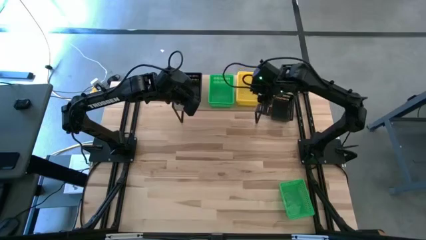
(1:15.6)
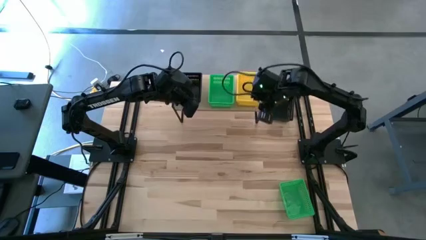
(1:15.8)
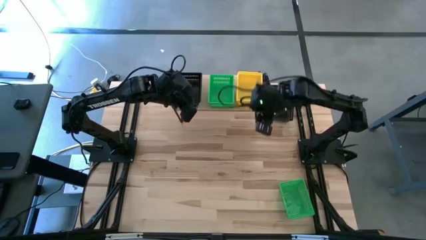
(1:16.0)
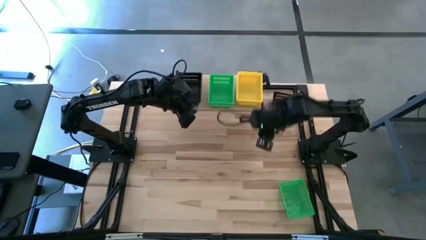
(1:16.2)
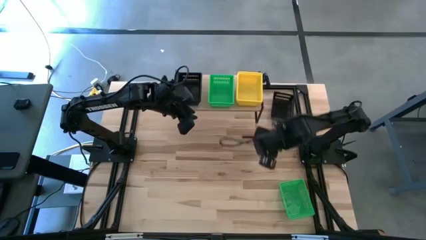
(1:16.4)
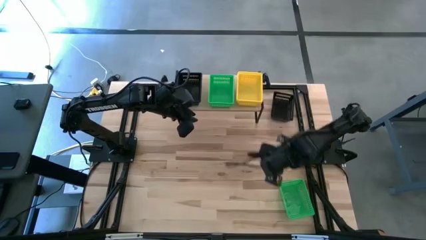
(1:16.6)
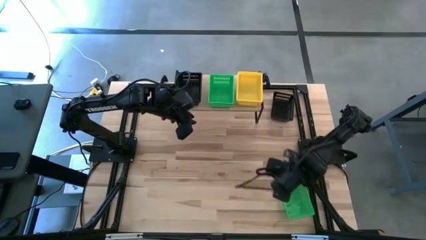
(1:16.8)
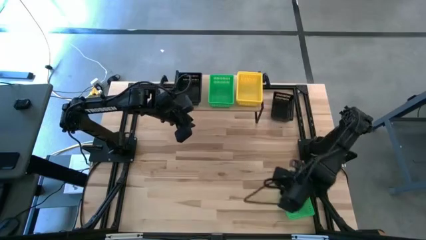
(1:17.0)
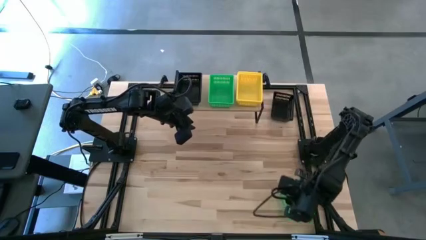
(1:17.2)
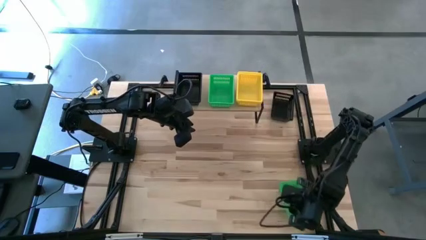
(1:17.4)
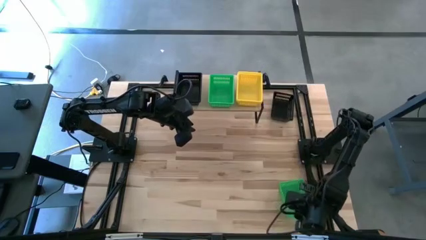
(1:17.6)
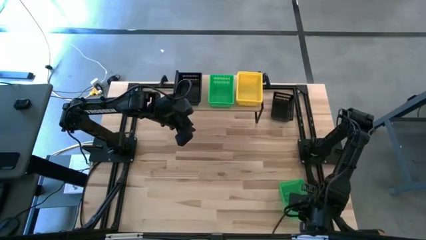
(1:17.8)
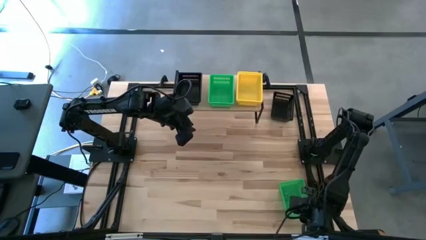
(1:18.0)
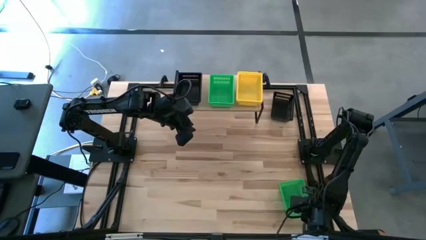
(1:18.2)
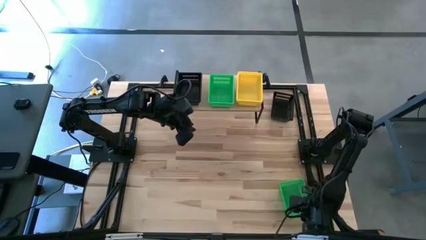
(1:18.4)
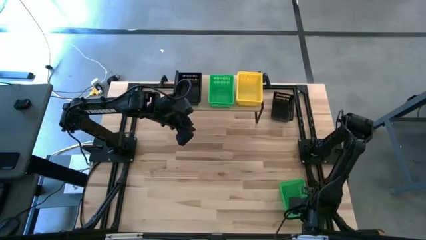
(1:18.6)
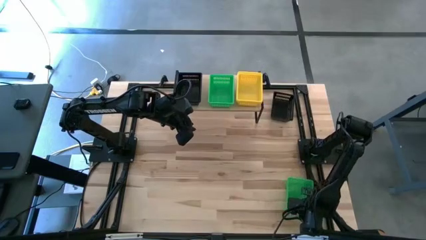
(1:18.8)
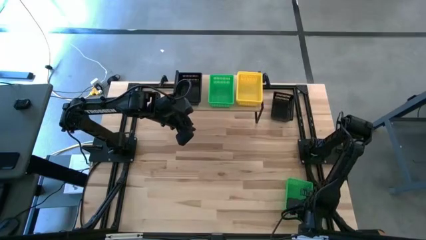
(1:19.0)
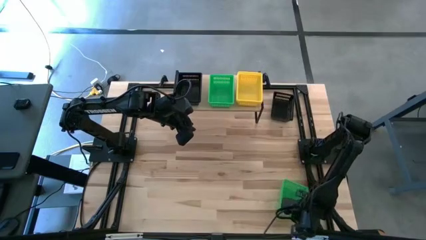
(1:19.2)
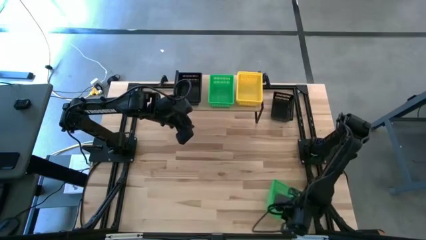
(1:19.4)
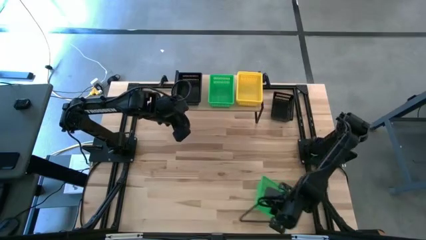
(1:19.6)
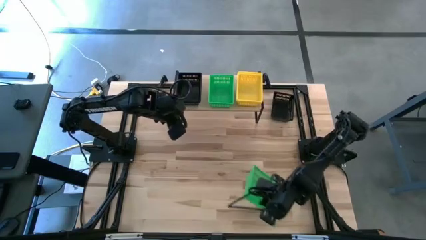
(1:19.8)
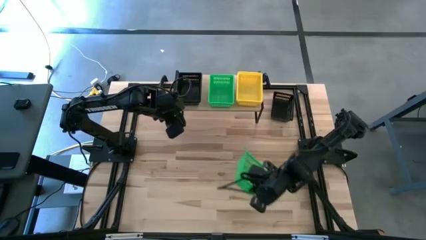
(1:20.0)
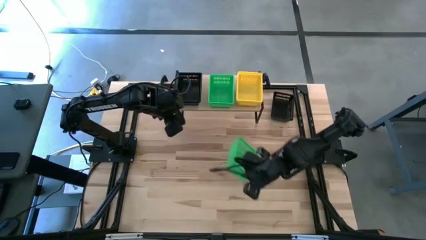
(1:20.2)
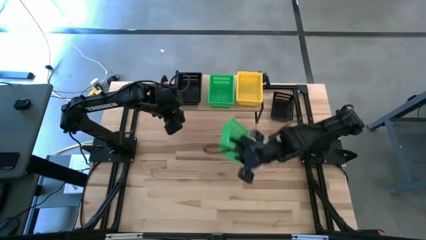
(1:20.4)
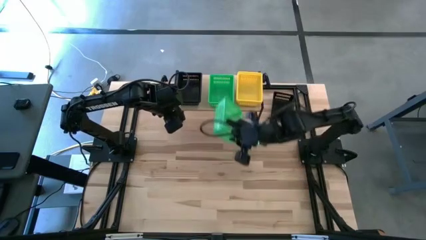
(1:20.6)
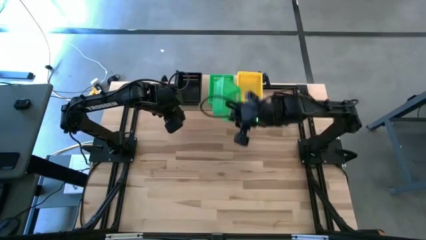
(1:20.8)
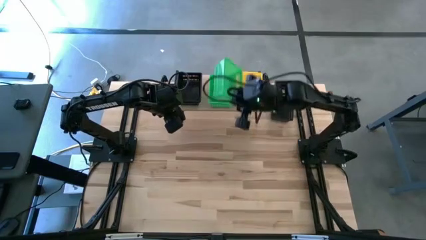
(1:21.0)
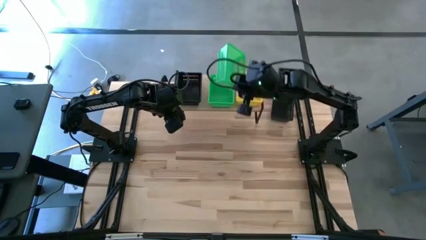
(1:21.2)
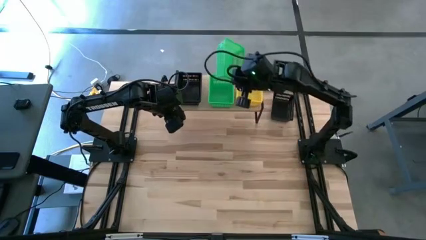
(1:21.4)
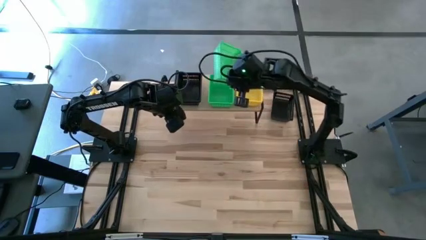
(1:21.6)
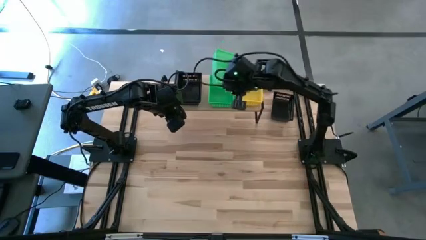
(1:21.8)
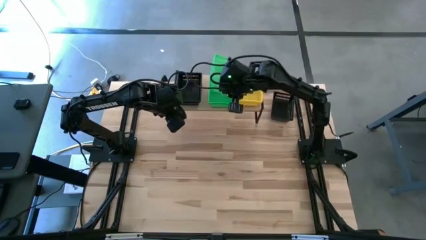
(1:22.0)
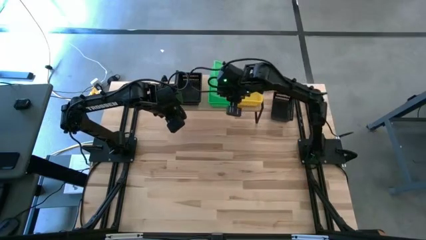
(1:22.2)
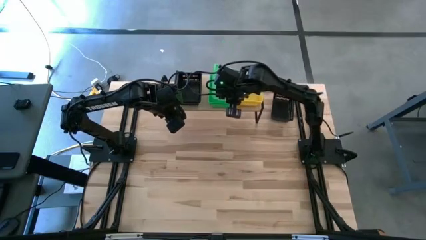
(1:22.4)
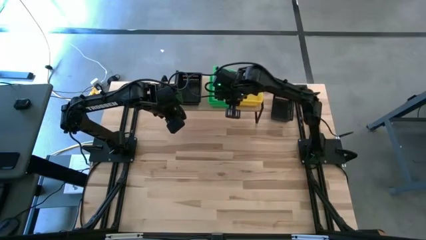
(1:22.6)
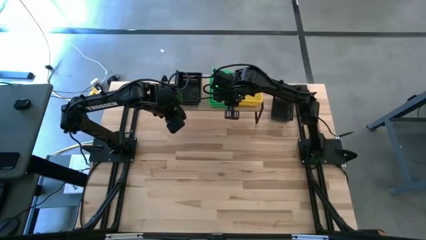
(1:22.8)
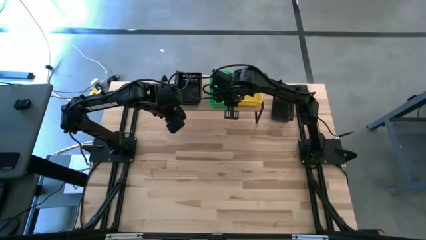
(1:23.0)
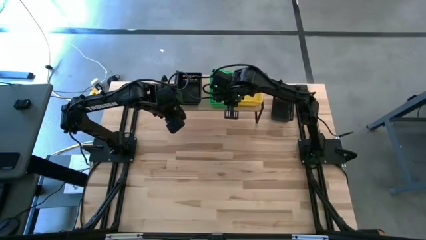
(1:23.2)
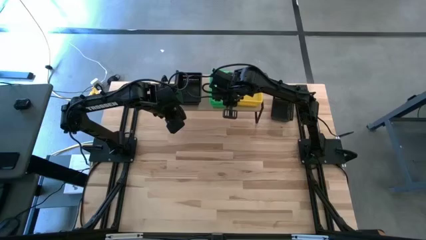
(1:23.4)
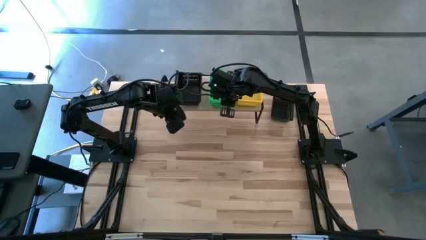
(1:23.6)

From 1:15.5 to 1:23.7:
Task: Stack baskets on shelf by color
Stack the green bin on top of the other green bins on the shelf

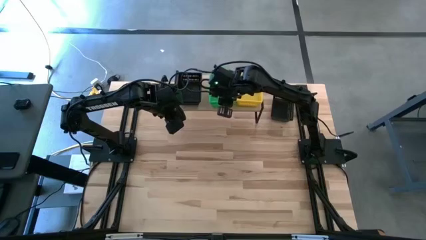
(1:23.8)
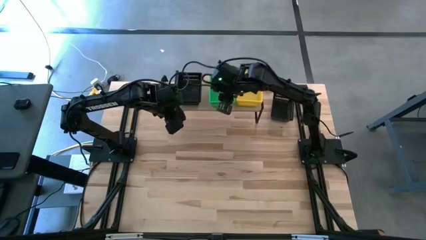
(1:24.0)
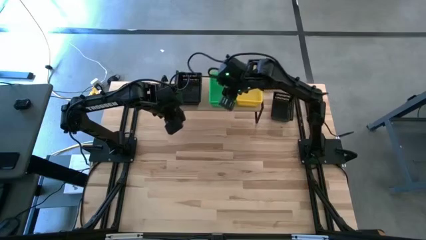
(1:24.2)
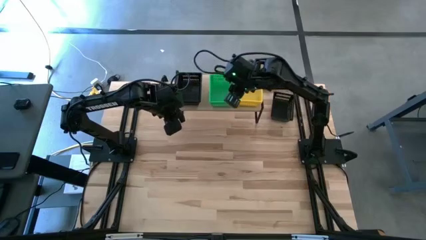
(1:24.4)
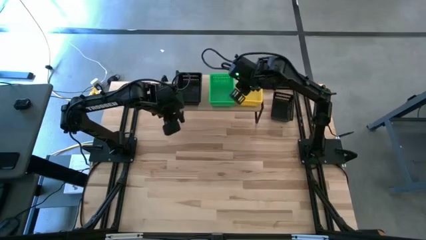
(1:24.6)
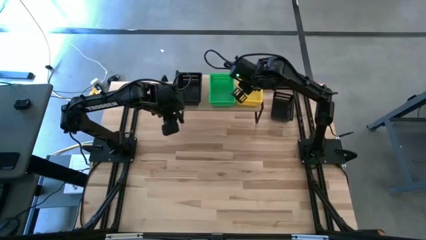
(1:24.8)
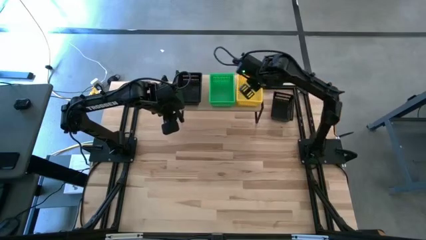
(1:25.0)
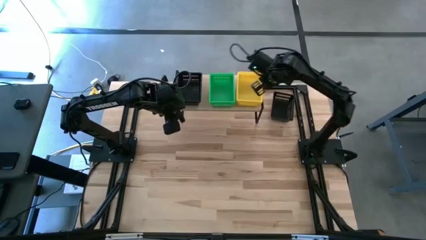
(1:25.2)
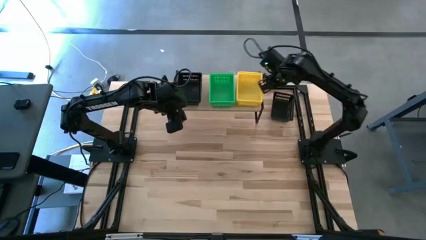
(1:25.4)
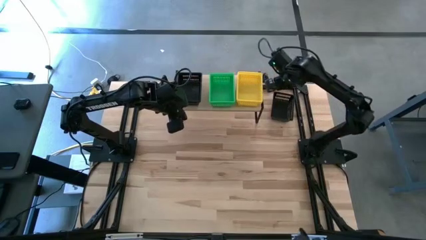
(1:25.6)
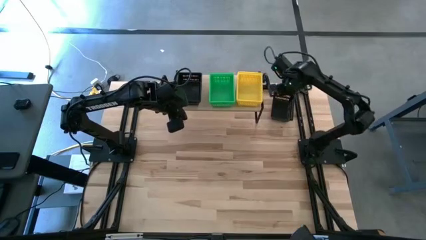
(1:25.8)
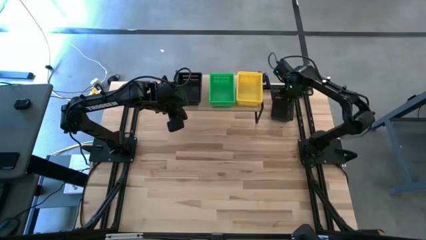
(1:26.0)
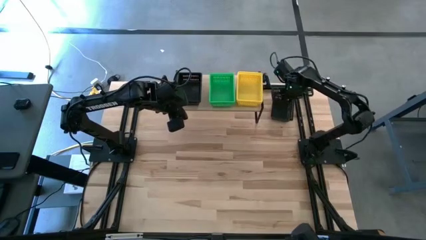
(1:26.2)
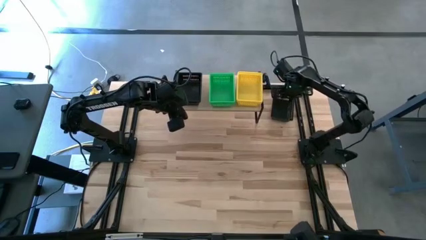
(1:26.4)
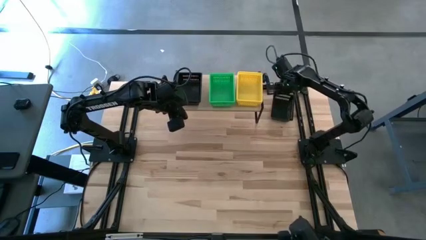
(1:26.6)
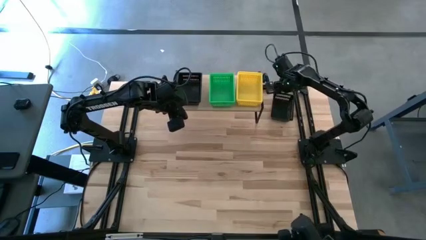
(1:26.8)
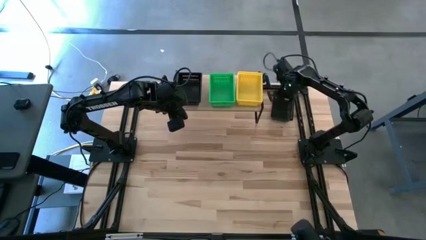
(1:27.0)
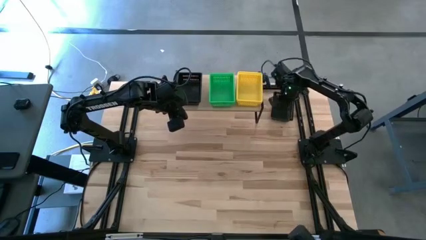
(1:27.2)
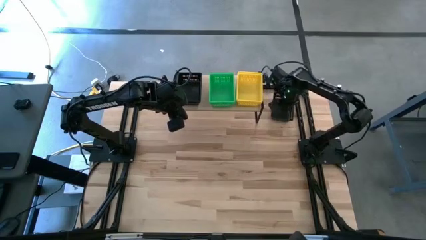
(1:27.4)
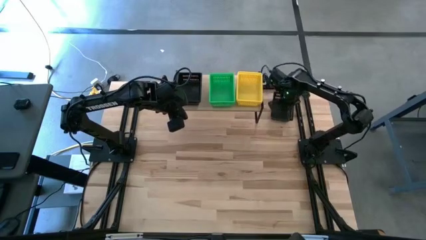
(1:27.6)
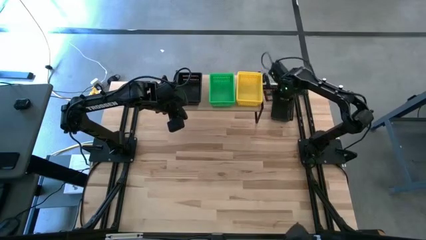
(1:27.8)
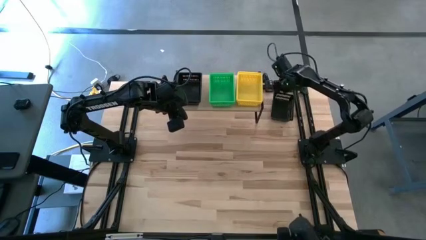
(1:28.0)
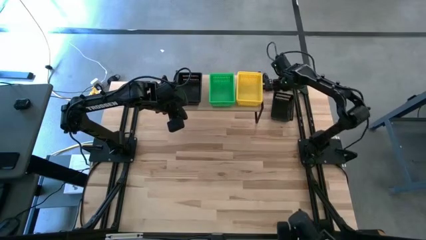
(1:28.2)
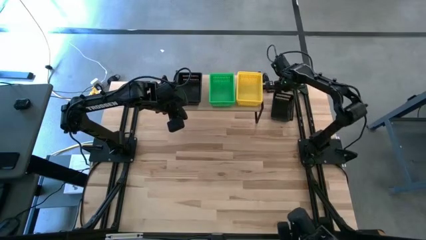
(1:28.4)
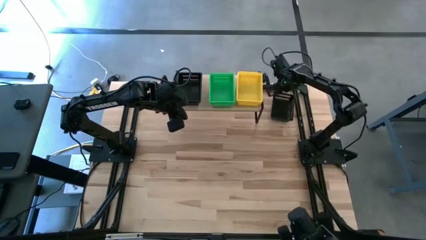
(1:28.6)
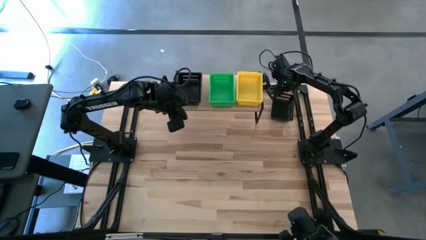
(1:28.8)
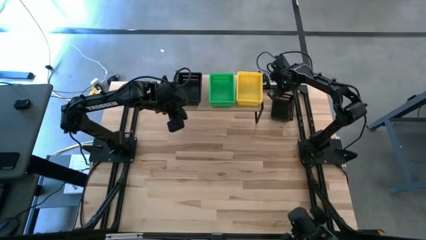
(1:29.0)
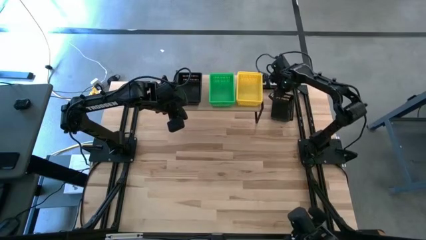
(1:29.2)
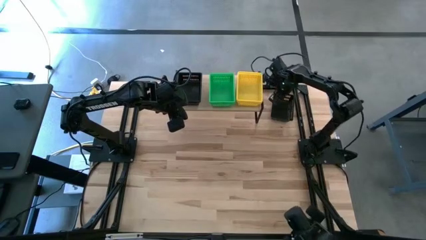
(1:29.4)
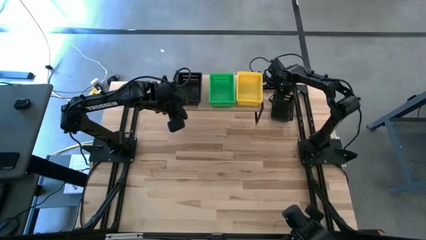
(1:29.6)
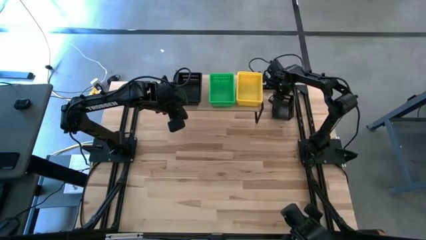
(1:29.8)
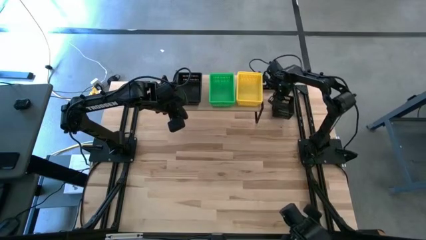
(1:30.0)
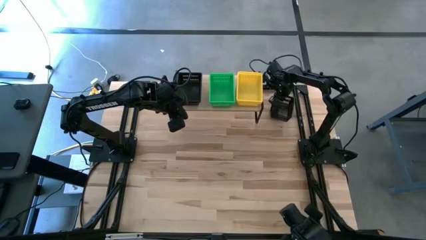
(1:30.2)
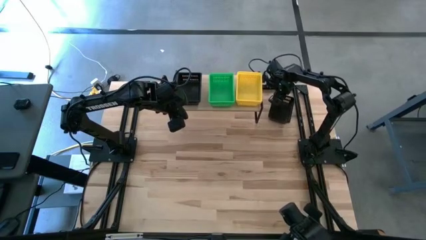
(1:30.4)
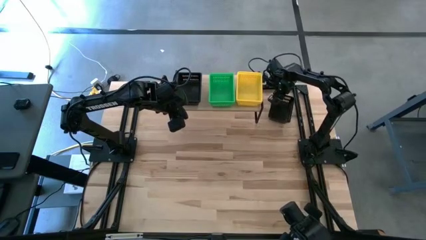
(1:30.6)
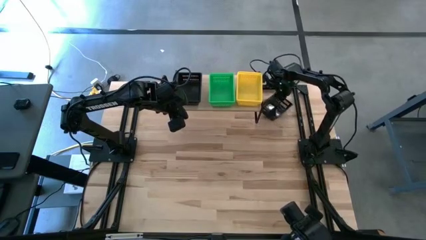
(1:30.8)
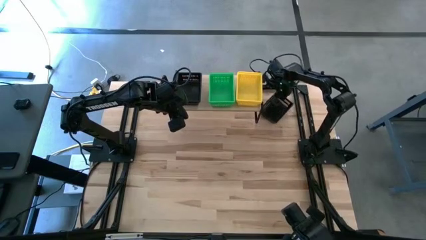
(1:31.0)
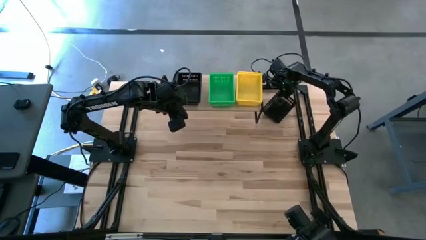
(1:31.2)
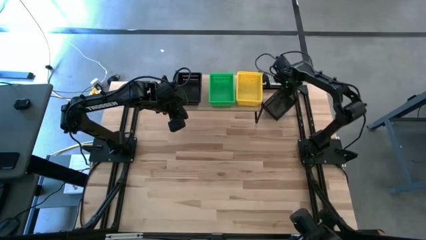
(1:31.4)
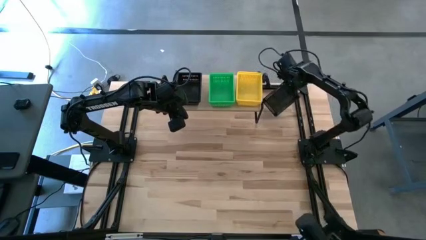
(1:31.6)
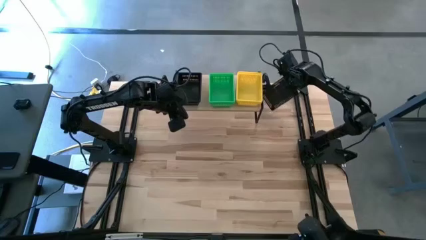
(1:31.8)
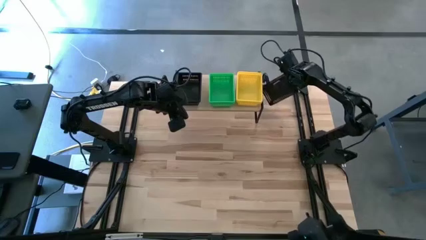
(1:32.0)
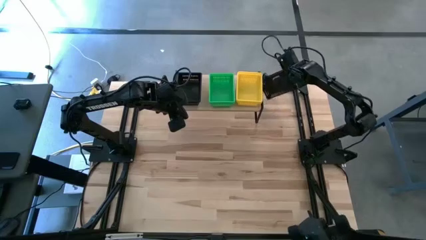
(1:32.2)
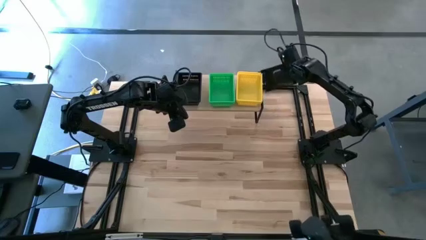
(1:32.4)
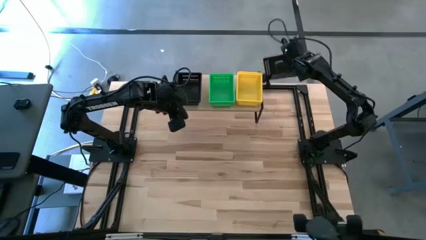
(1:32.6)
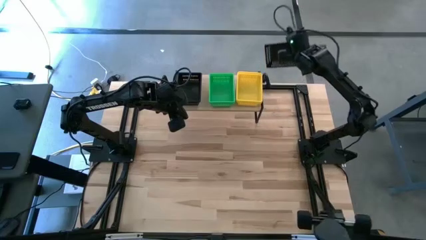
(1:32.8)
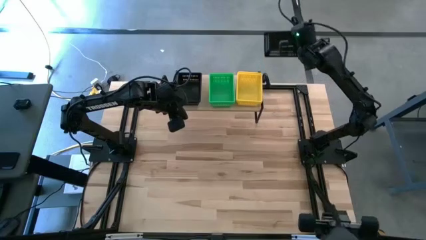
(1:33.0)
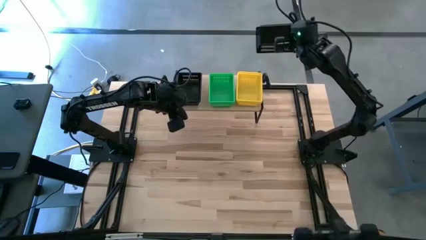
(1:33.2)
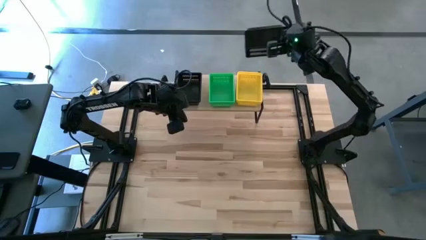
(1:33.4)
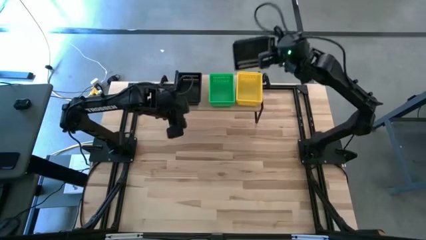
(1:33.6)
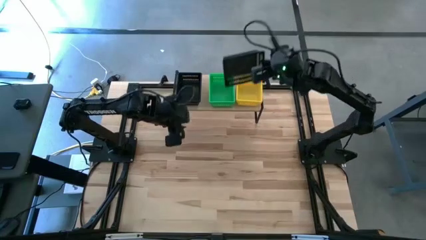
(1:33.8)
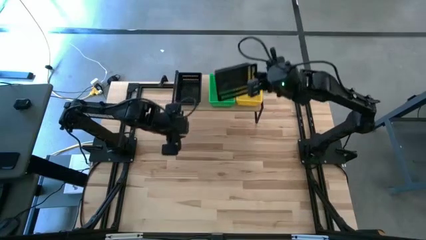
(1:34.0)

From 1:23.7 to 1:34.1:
Stack the black bin on top of the other black bins on the shelf
